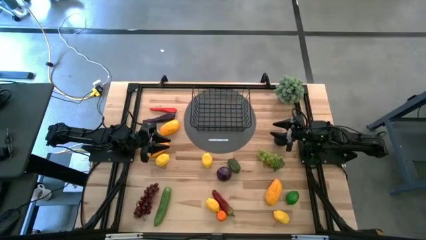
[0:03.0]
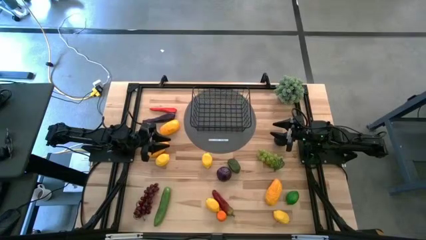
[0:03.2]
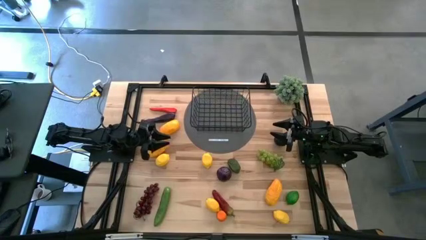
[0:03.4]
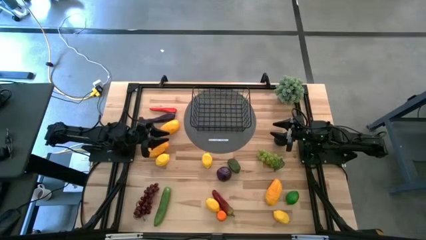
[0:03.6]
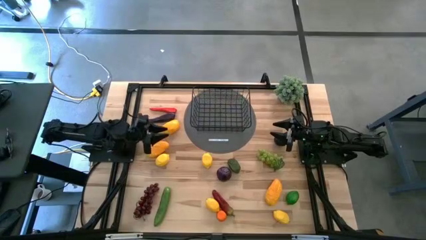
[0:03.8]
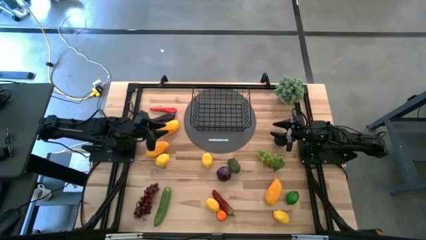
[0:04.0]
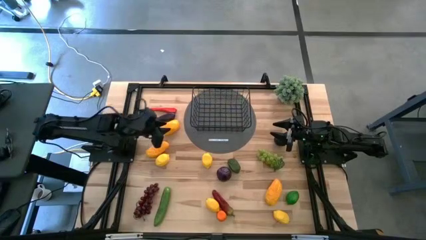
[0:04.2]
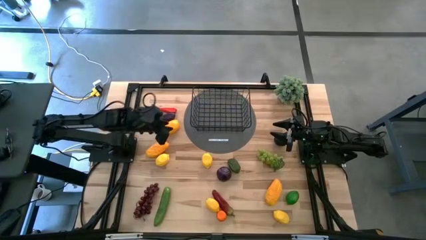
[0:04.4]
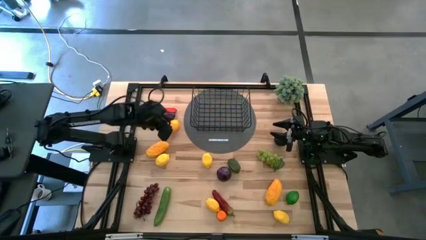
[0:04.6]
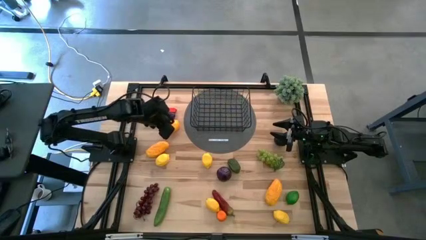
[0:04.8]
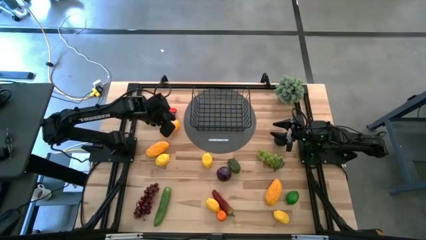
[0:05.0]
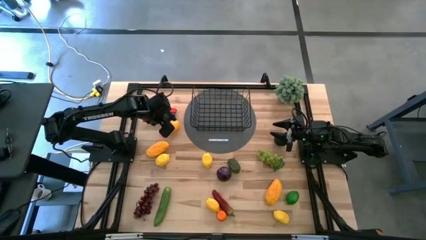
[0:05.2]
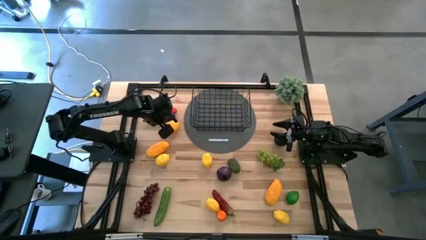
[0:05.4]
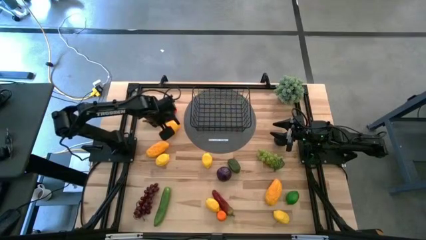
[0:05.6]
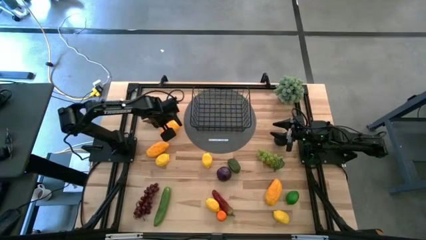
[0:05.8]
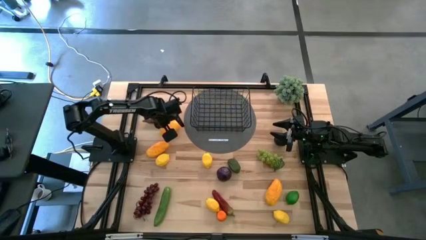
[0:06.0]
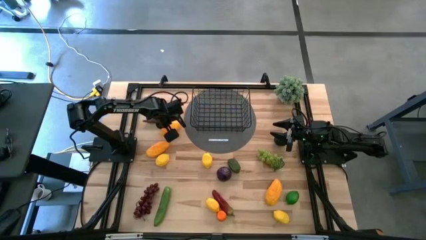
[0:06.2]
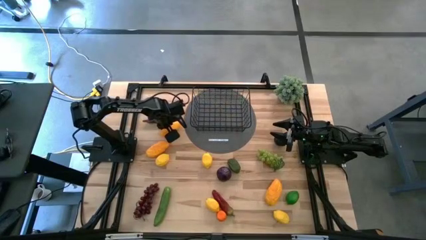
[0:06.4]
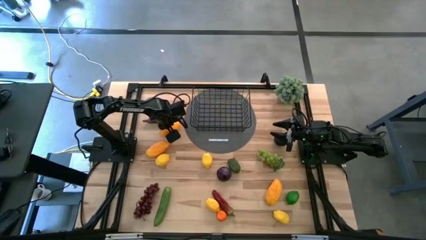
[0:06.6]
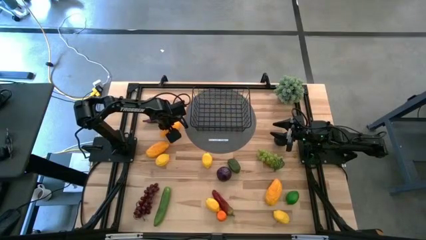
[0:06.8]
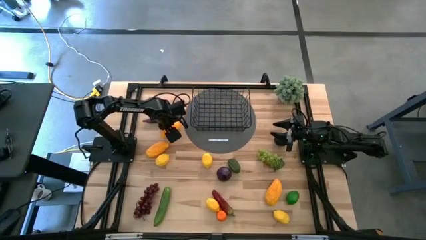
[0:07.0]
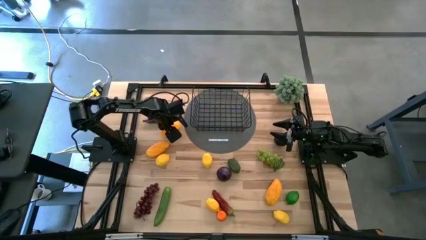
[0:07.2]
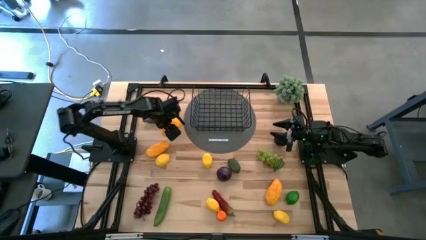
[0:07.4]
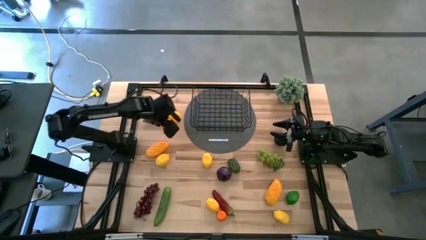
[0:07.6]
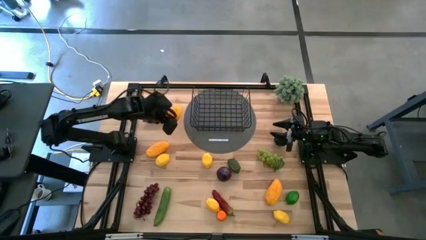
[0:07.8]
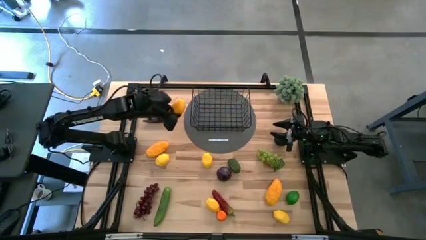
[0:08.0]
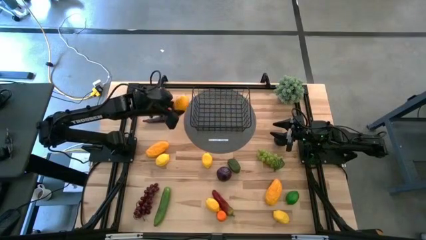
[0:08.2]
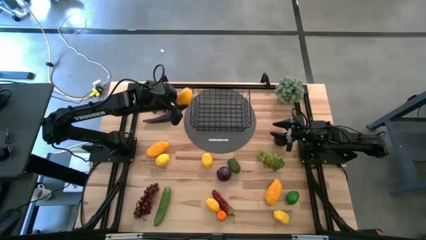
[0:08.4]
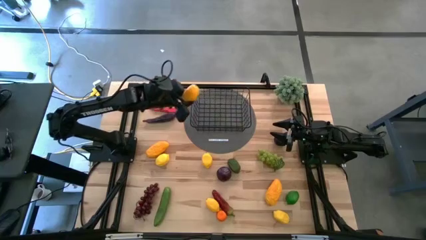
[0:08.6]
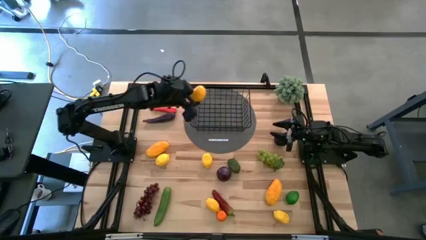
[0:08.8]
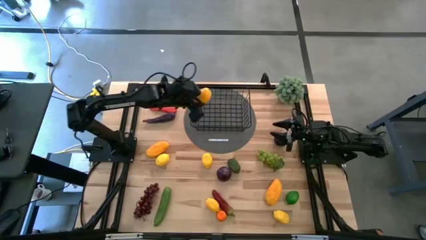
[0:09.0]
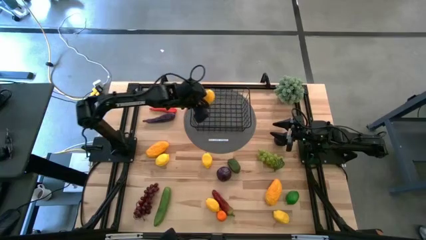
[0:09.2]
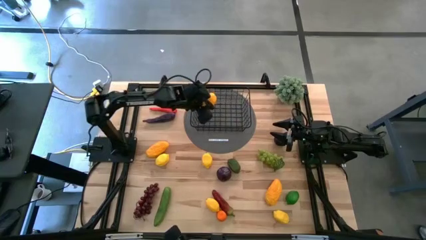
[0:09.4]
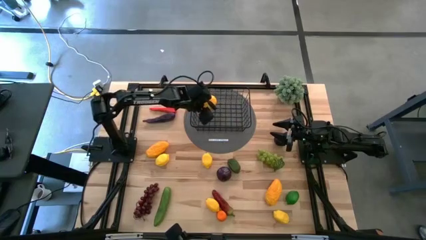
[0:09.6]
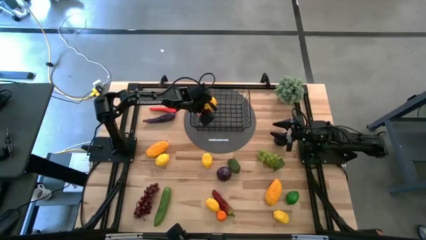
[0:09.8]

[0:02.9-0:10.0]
Task: Build produce basket
Put the yellow mango into the black wire basket

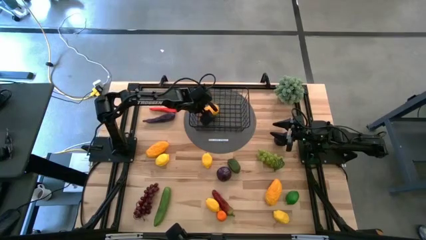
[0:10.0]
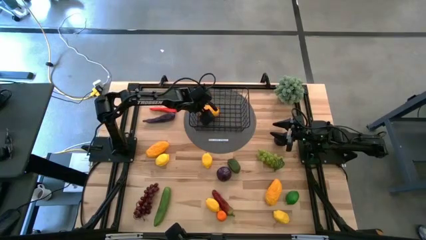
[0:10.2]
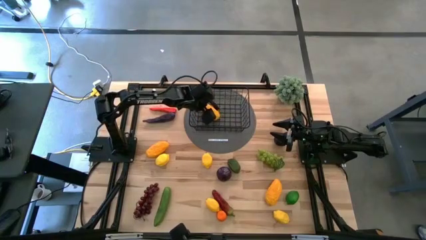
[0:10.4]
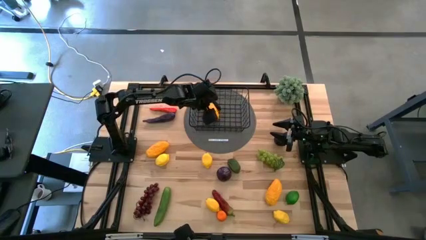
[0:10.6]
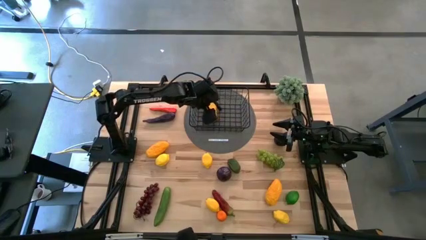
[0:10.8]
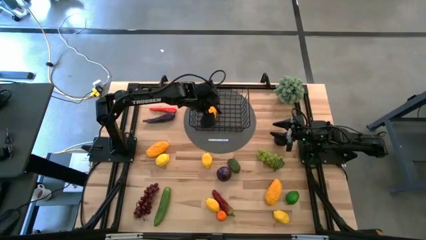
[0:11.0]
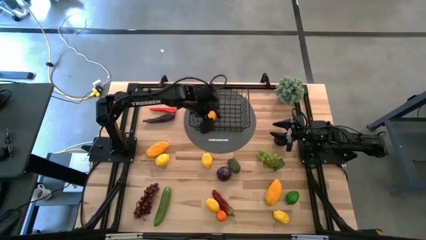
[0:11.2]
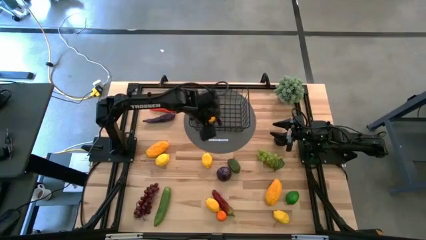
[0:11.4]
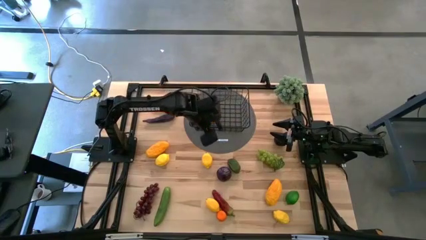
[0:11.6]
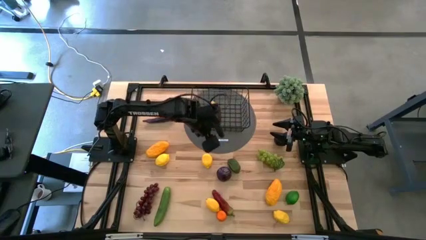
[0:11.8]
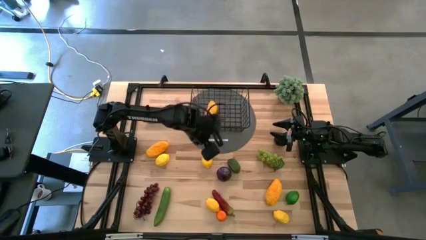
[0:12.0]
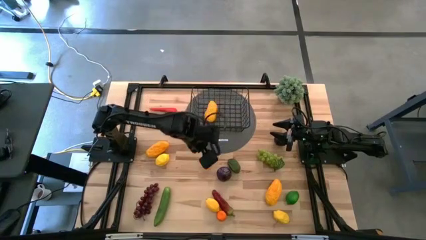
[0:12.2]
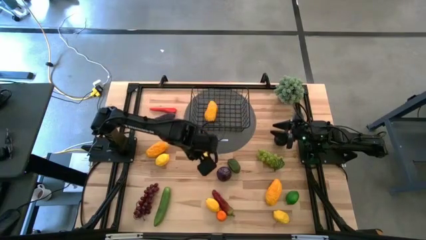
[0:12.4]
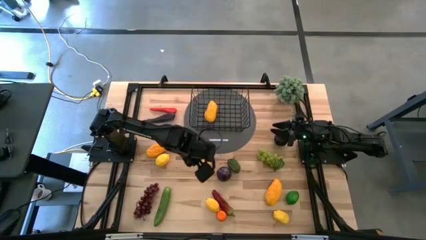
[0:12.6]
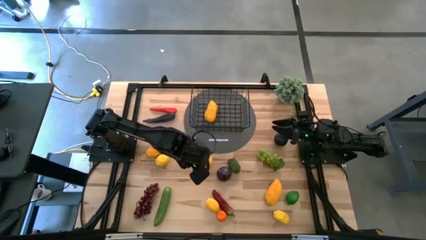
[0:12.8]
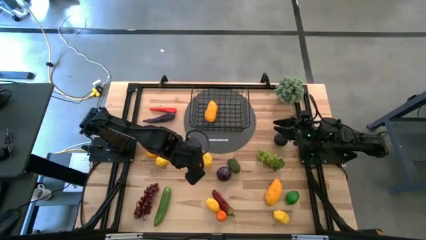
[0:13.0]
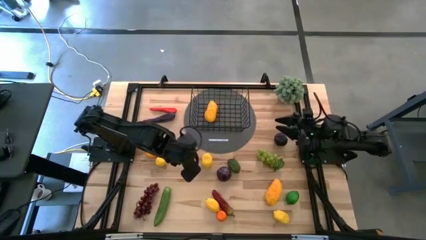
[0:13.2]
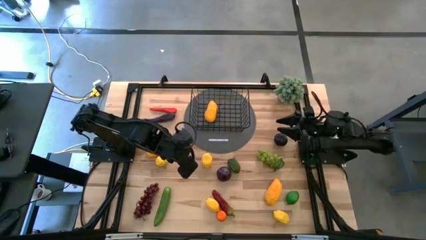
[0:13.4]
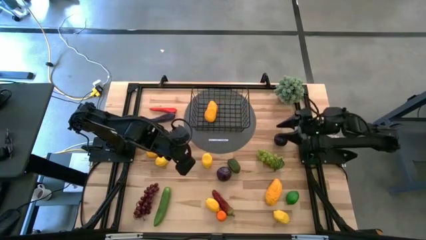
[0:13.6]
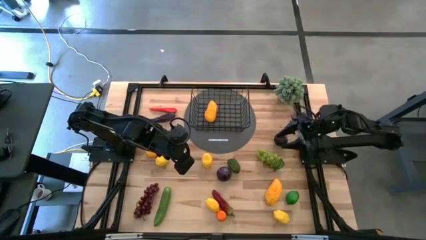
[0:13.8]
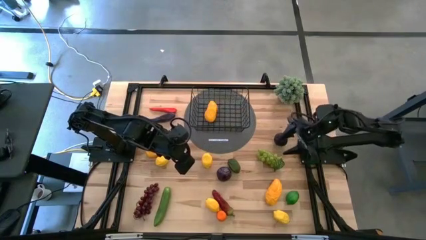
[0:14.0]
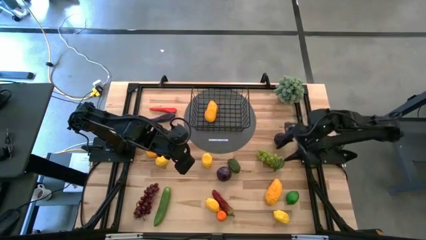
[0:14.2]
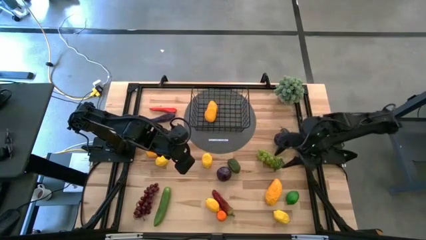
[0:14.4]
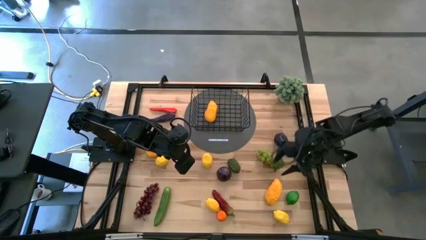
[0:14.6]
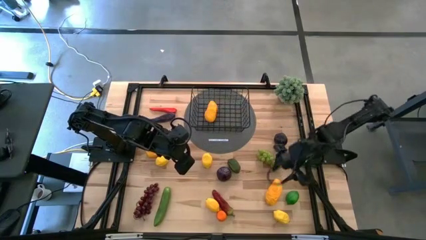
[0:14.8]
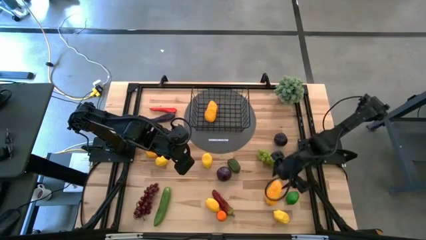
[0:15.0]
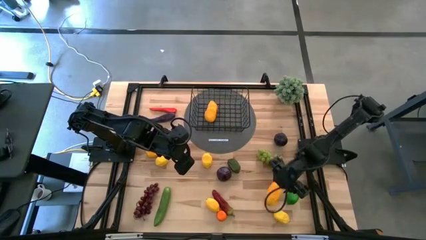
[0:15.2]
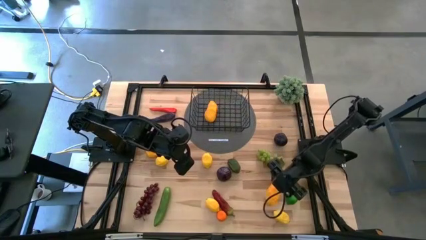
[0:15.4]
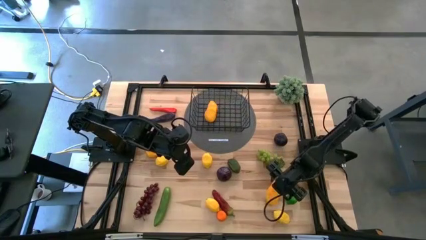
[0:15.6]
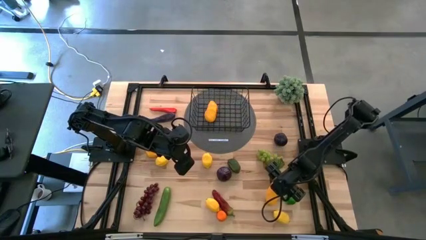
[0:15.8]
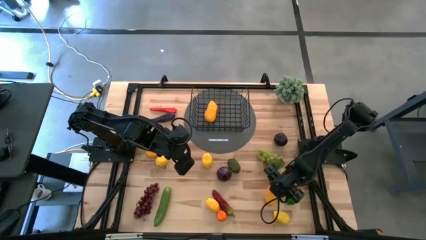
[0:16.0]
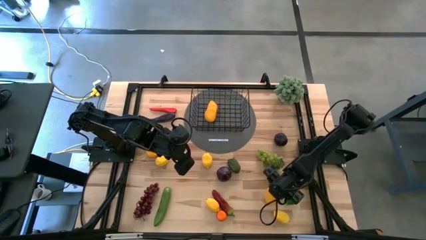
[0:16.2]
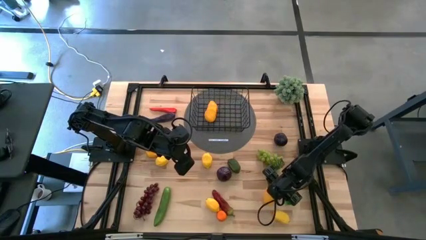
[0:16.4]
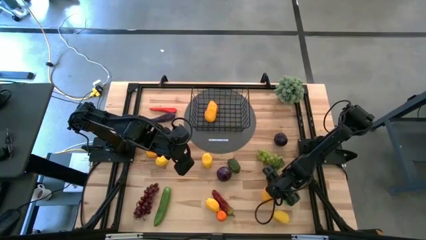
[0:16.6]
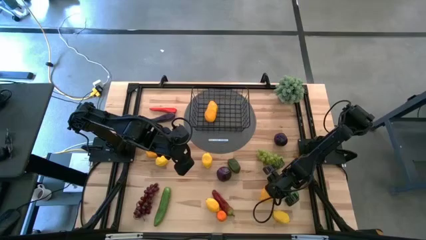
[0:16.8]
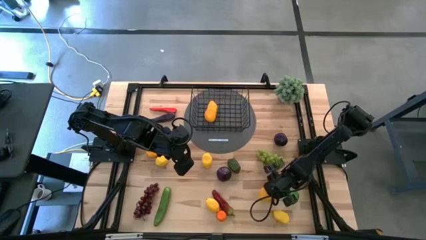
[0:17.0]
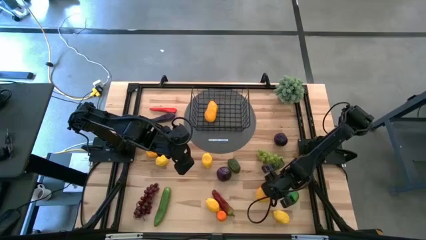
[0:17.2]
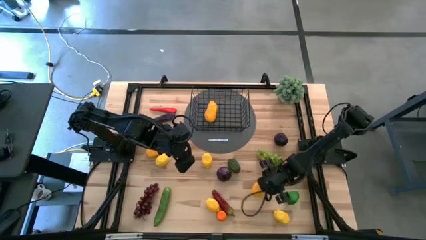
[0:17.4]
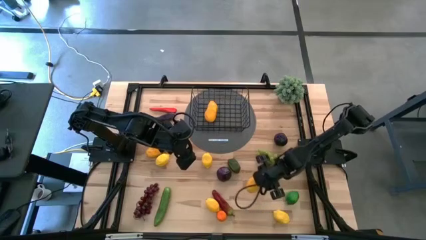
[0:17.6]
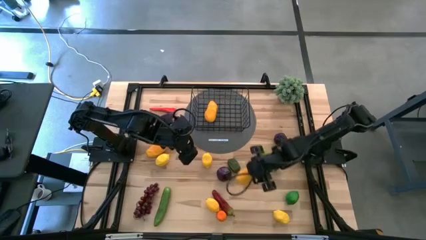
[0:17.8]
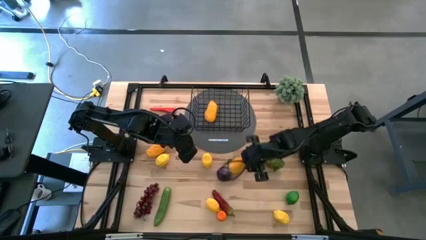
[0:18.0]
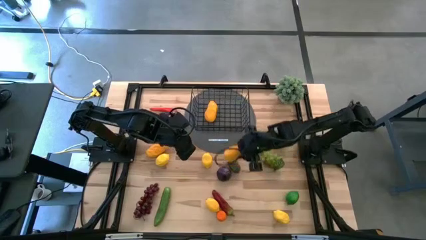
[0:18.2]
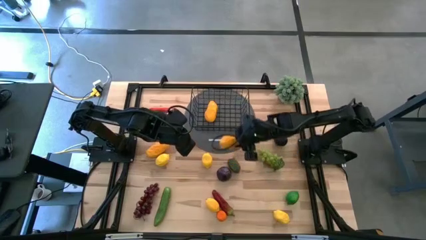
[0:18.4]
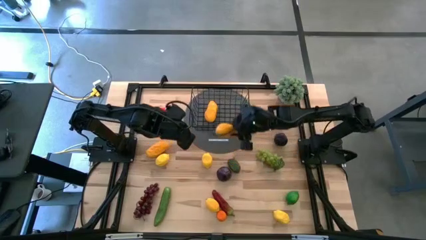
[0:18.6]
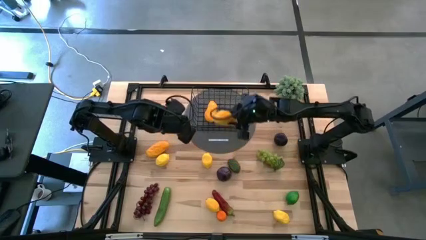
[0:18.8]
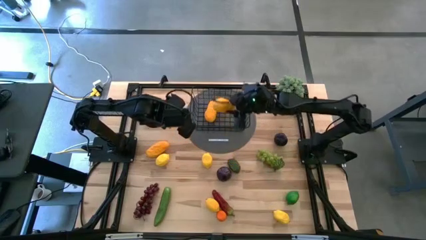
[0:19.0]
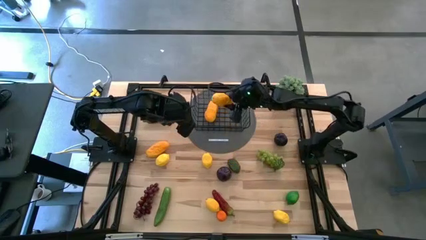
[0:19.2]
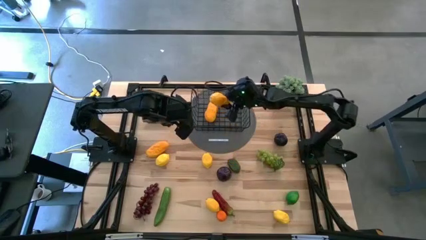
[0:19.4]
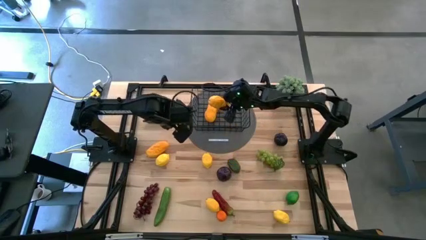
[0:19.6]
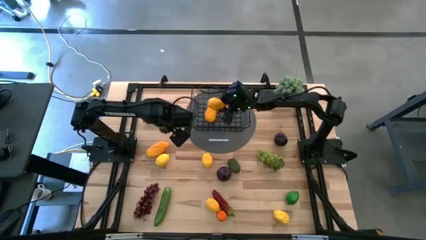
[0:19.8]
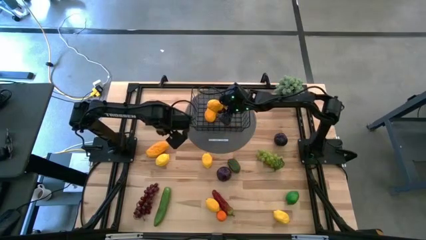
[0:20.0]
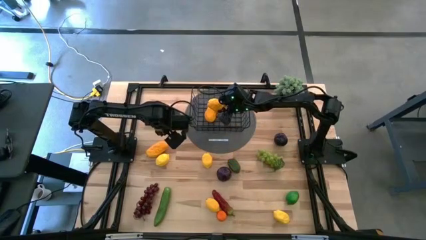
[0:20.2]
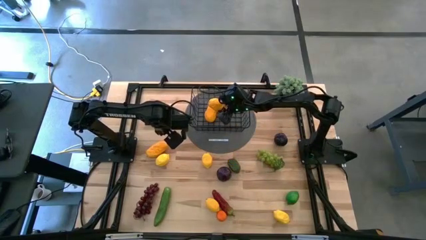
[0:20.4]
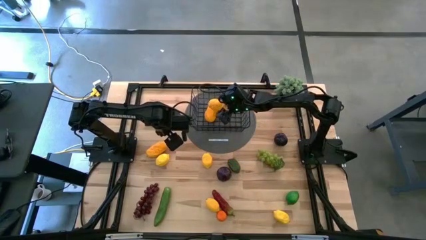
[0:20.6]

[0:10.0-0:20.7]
Put the yellow mango into the black wire basket
